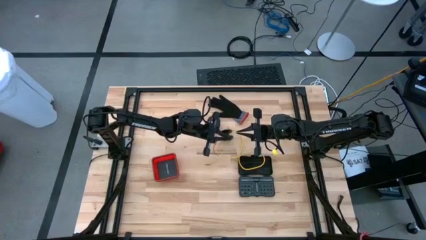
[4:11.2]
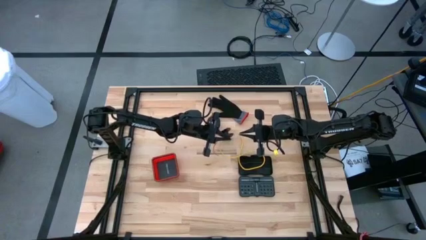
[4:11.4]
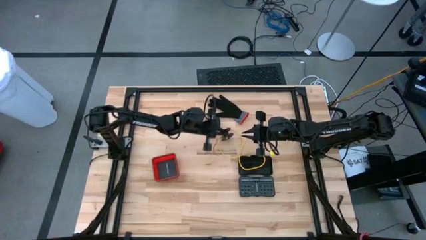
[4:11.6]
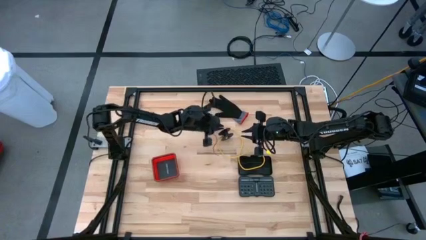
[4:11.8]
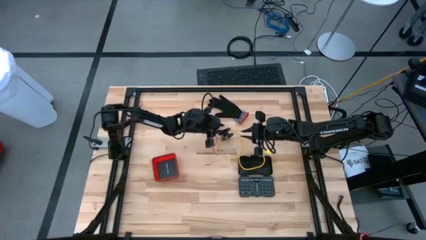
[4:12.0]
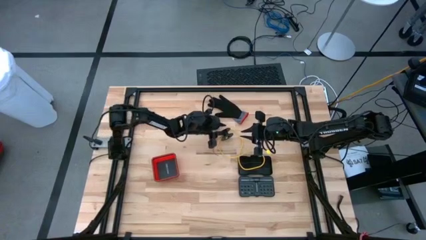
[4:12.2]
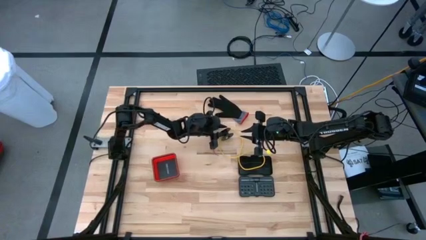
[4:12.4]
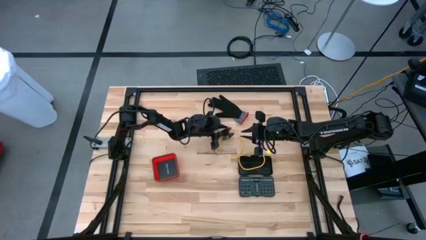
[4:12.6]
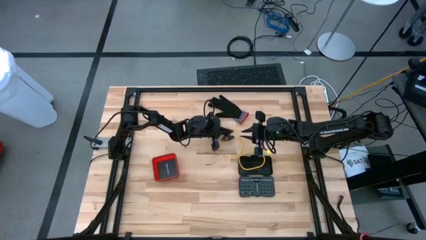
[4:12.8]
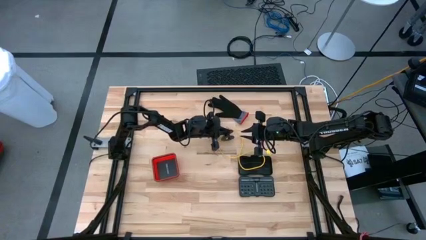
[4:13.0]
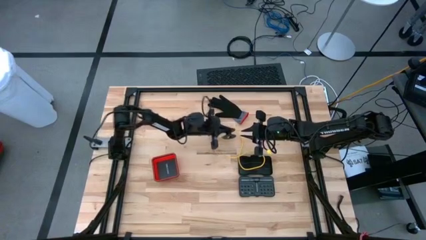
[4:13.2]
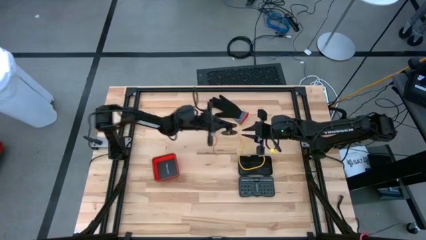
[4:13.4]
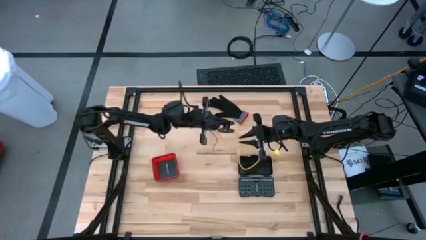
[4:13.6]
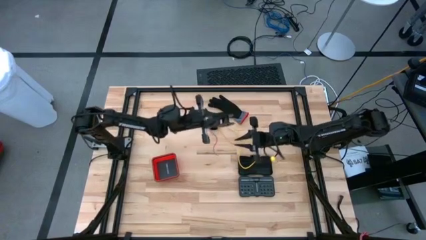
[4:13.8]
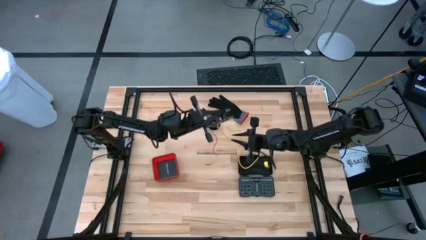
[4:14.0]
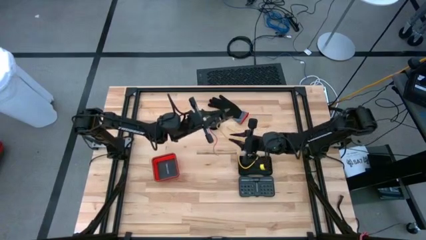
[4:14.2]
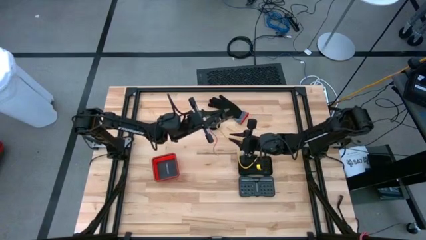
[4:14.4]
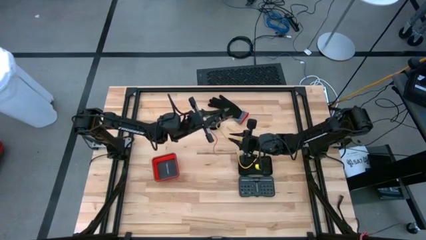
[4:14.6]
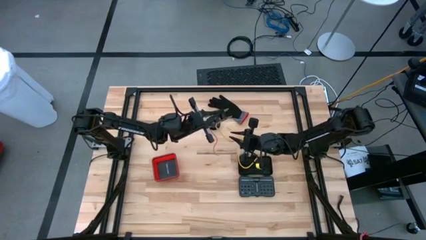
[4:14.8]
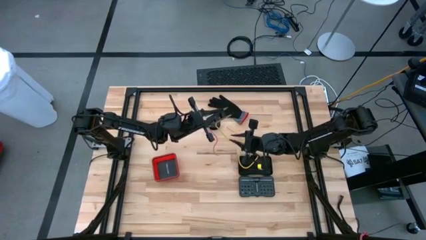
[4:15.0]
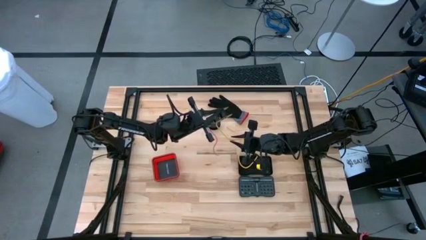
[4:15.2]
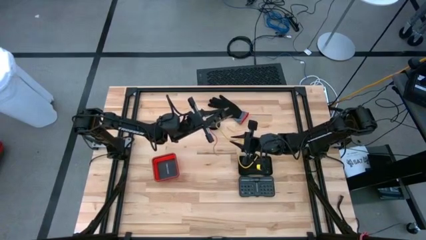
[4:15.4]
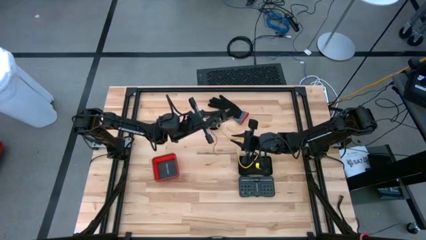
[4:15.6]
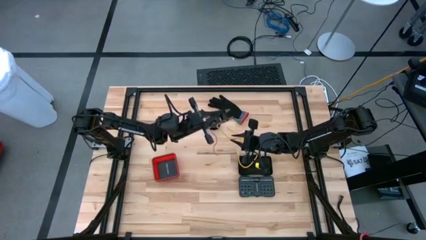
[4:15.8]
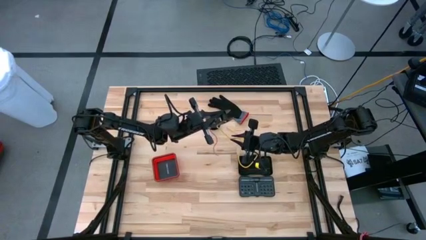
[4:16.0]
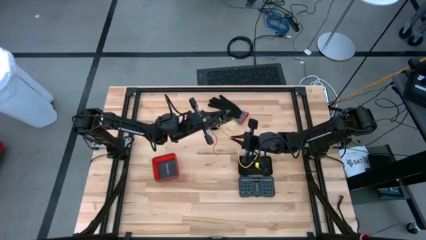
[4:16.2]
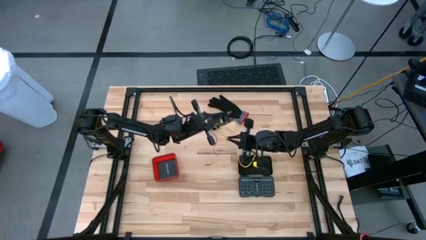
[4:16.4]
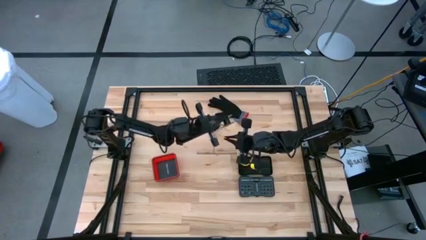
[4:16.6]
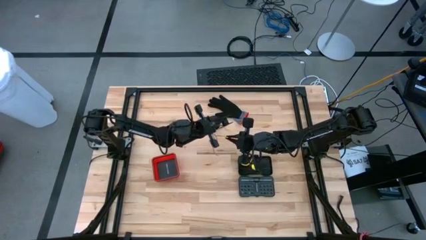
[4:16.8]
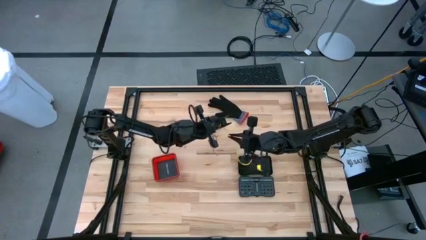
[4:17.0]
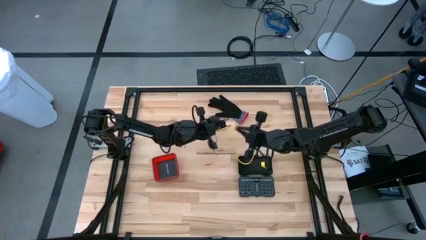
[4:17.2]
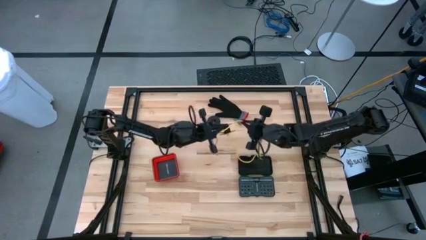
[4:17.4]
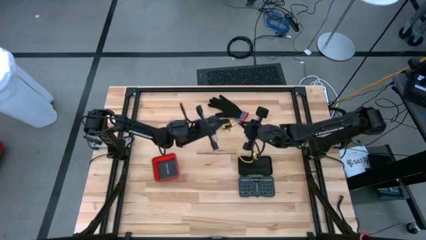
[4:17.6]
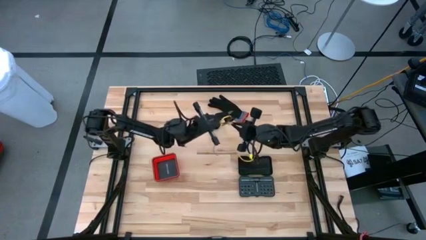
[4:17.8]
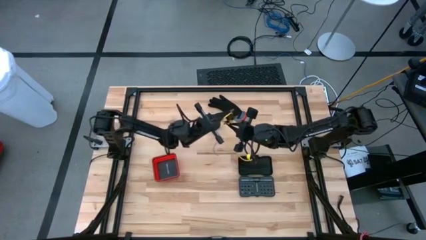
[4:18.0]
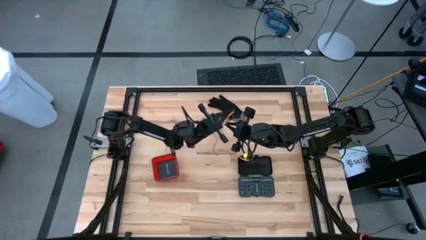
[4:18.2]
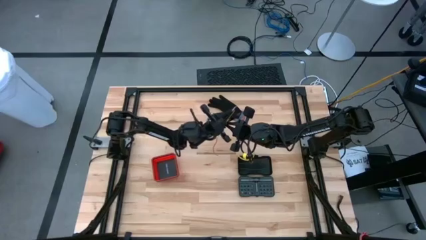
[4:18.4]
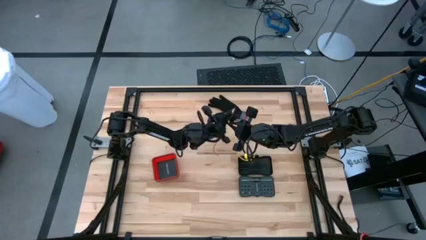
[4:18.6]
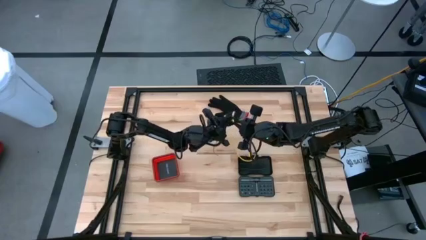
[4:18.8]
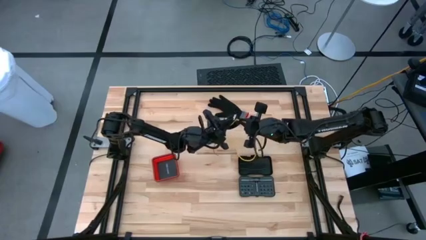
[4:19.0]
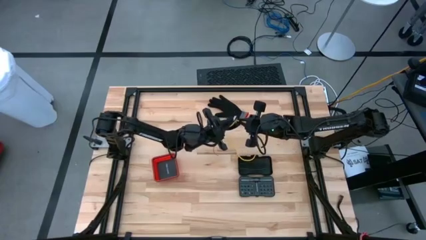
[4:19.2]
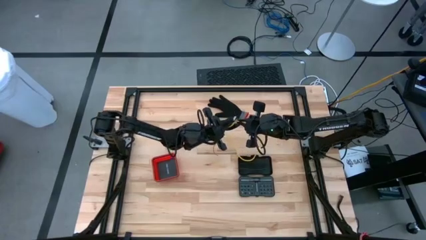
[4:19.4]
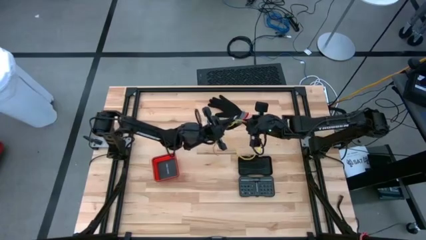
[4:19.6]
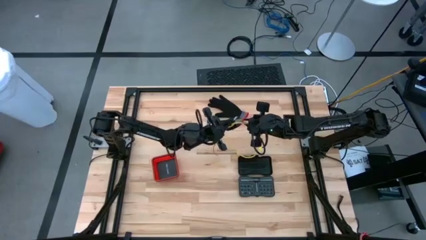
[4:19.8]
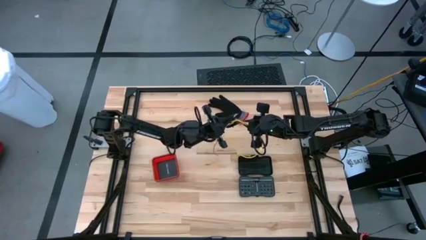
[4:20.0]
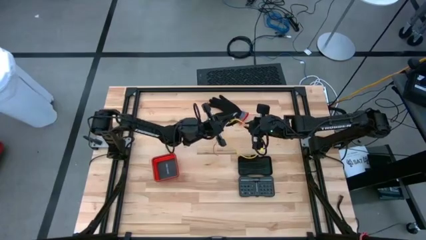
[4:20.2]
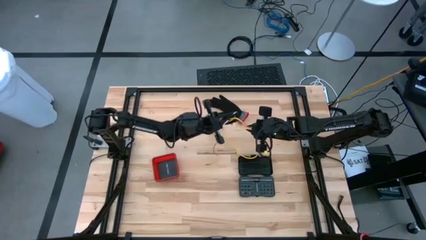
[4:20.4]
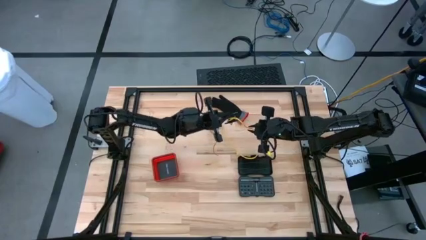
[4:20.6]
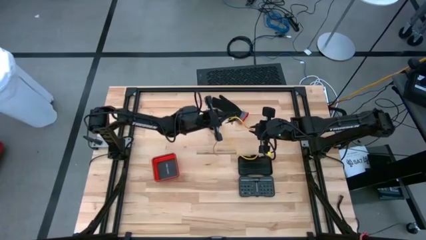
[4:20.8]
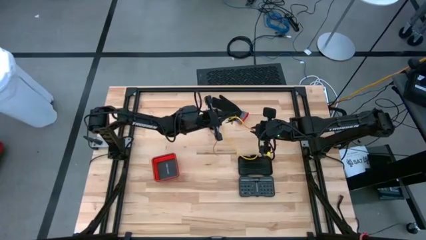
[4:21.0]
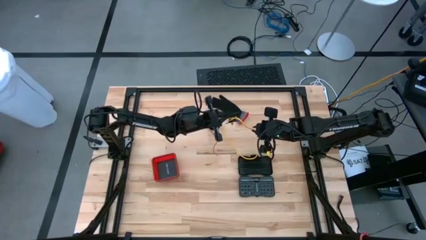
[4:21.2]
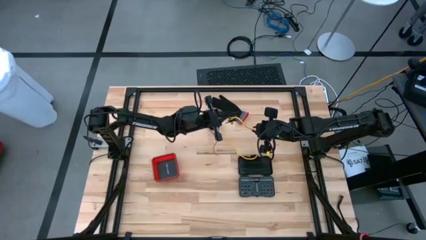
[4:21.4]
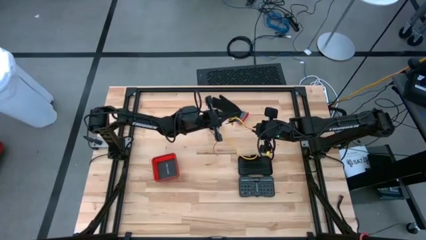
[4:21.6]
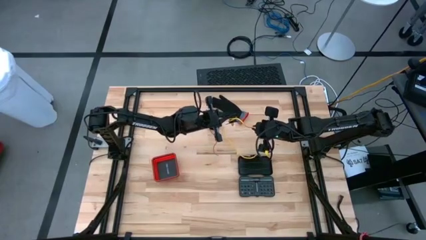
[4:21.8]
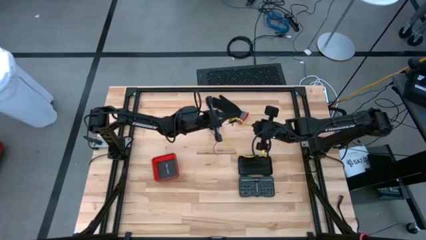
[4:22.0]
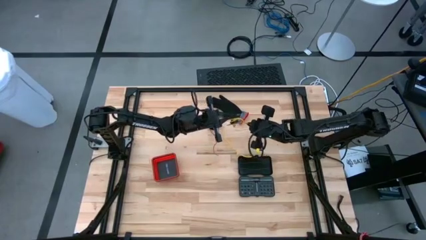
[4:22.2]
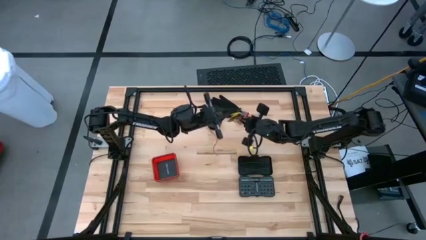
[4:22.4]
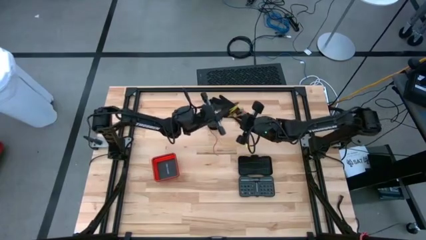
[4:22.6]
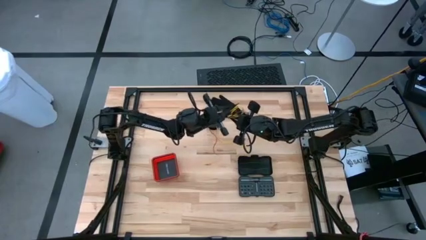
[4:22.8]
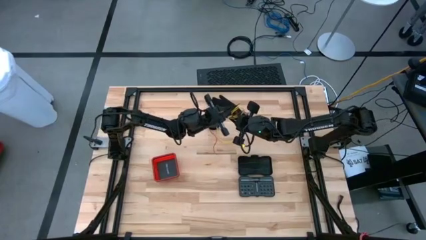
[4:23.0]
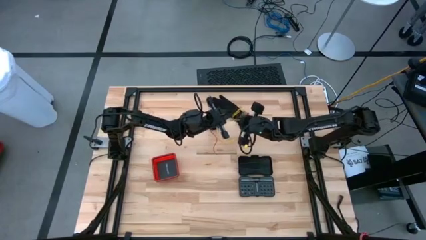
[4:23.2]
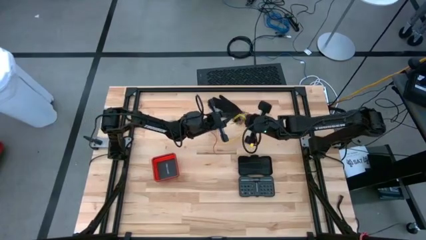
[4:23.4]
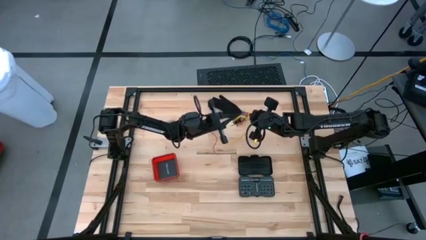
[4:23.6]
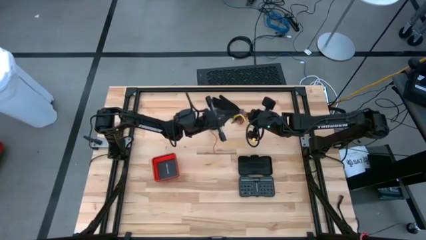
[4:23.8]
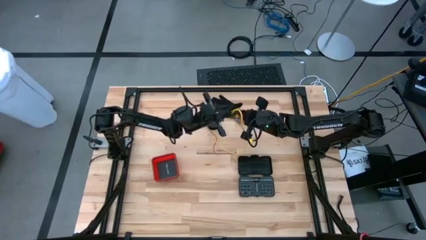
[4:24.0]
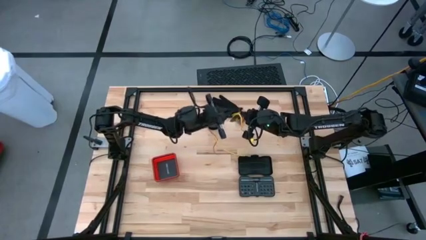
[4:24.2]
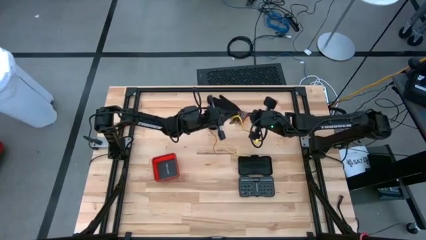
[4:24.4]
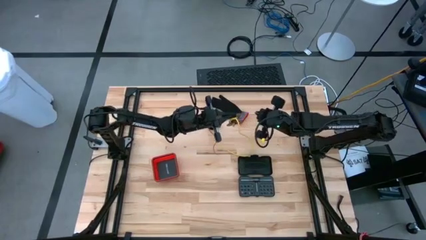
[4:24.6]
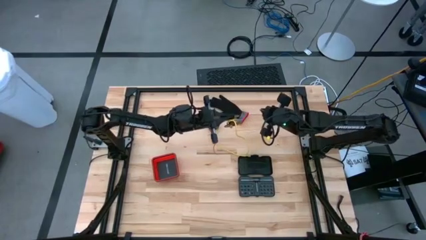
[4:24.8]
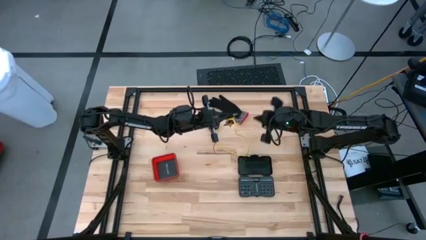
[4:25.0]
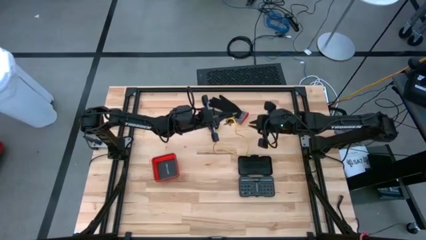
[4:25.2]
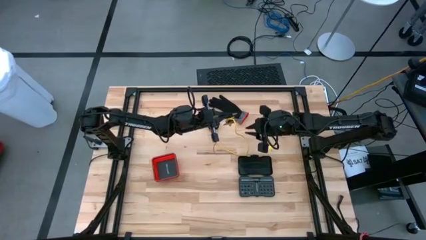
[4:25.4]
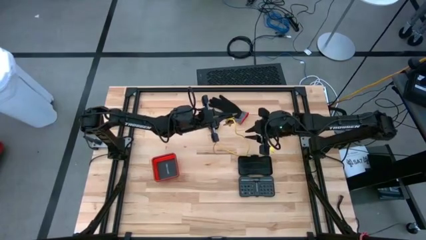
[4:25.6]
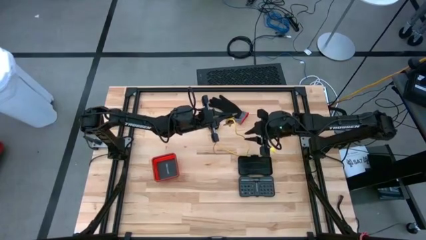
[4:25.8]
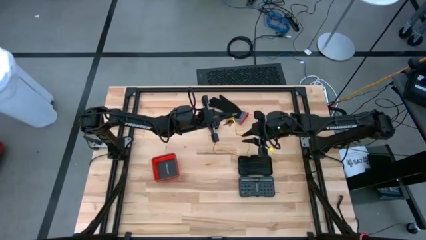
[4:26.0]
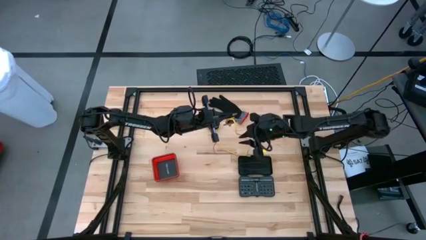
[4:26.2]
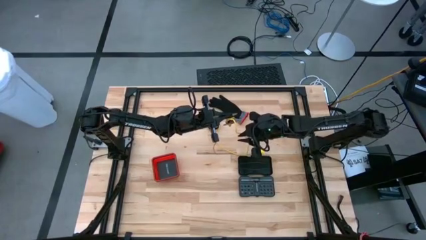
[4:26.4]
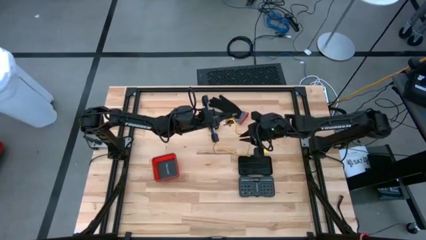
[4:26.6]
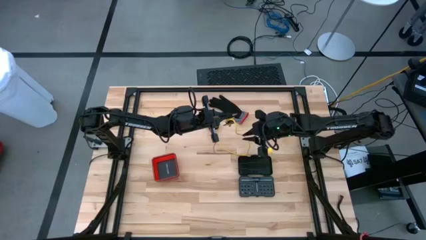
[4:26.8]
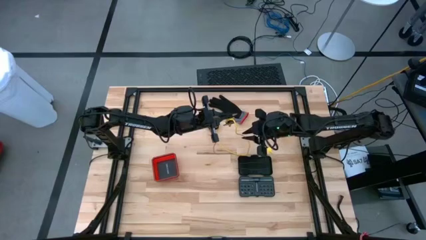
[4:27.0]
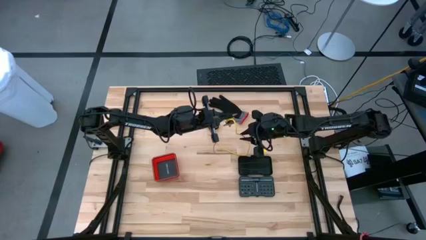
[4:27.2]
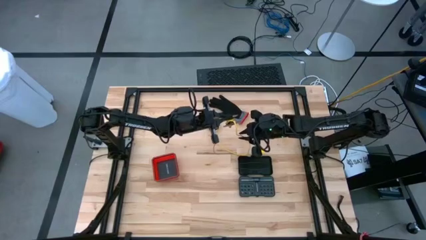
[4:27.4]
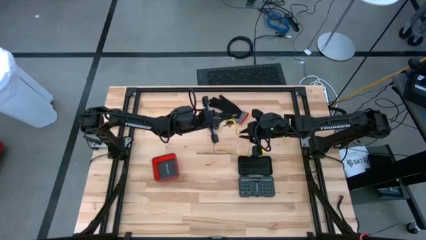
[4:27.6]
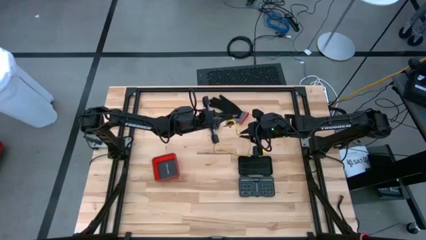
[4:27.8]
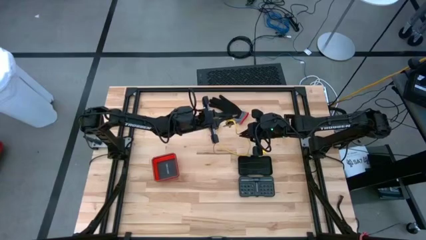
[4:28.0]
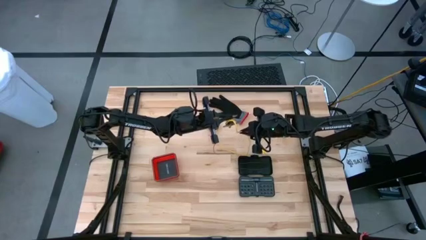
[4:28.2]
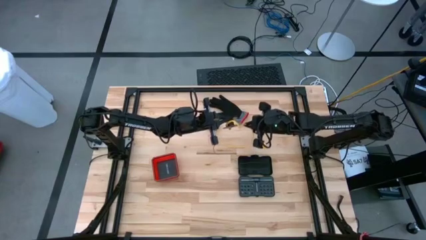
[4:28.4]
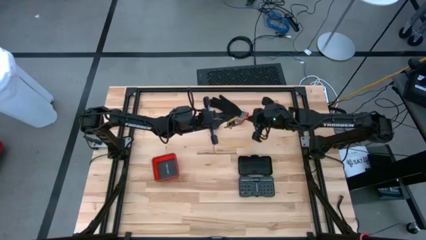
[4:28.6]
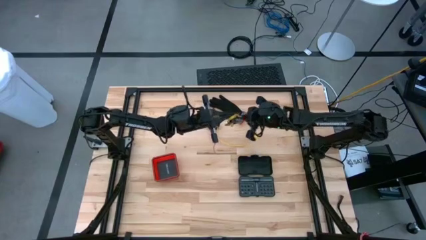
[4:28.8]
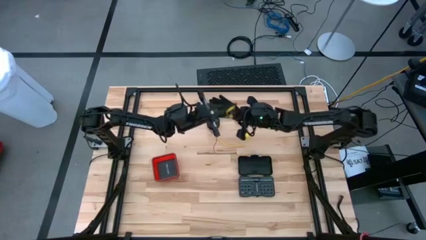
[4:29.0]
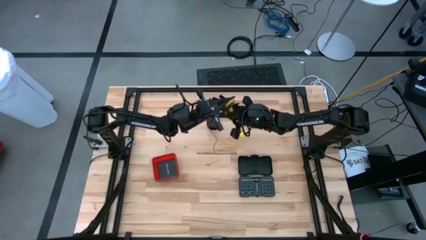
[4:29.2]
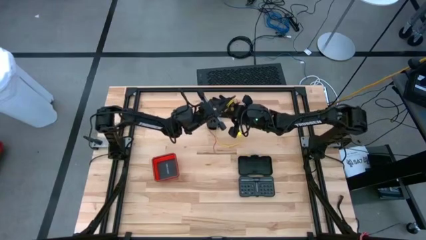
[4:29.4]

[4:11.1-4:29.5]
Task: Coil cords
Coil the yellow wire onto the spool
